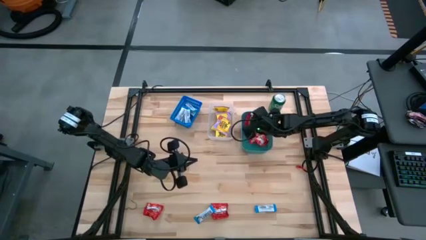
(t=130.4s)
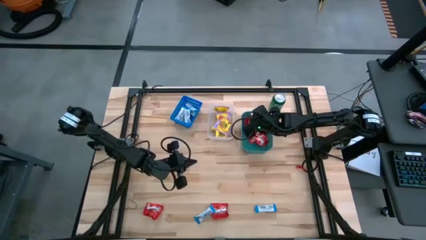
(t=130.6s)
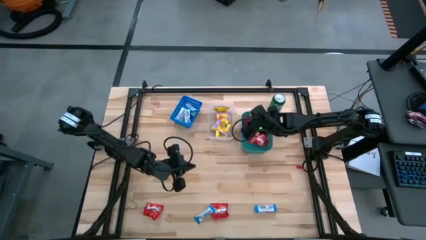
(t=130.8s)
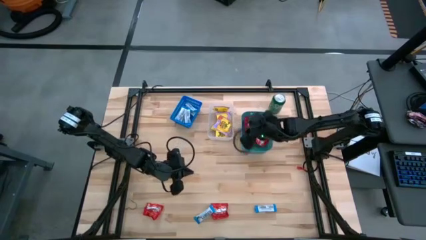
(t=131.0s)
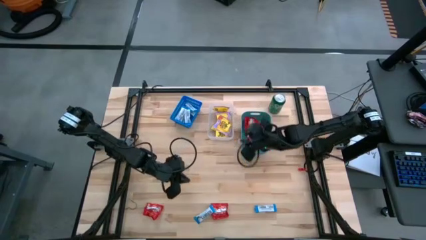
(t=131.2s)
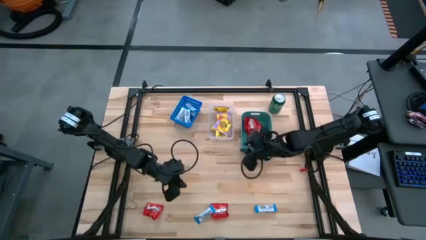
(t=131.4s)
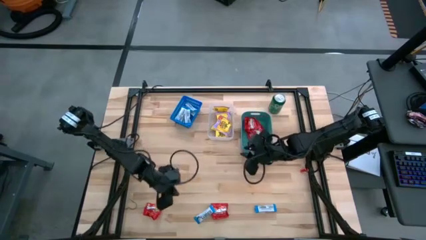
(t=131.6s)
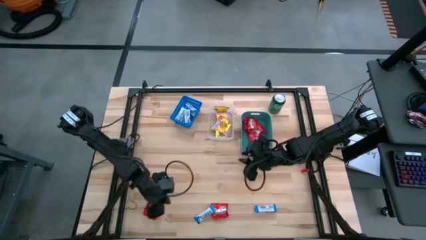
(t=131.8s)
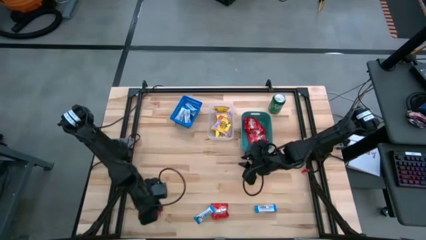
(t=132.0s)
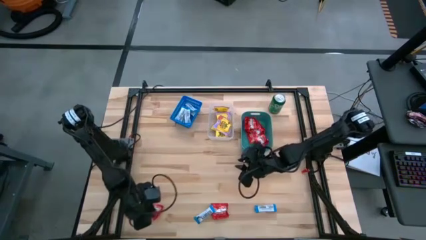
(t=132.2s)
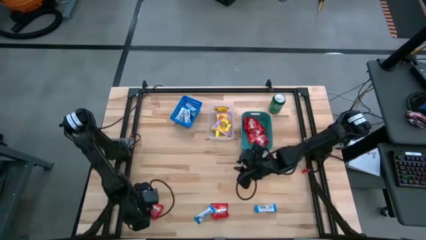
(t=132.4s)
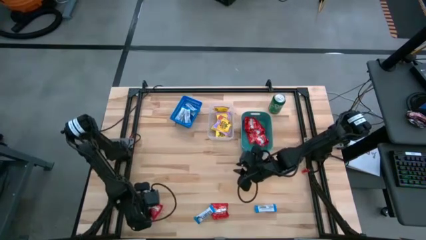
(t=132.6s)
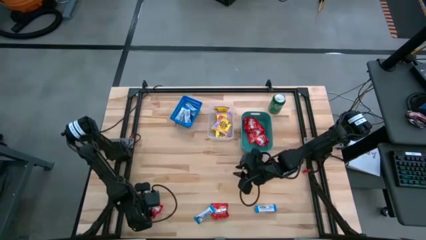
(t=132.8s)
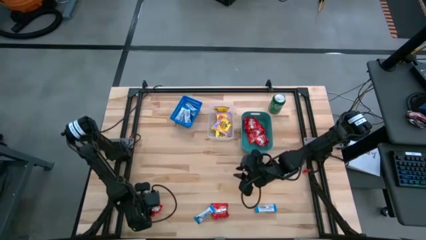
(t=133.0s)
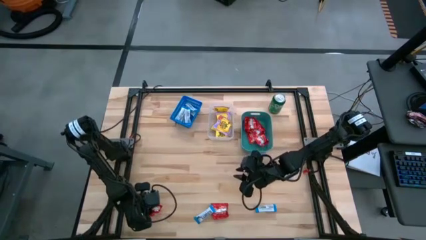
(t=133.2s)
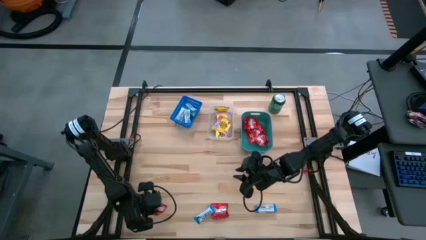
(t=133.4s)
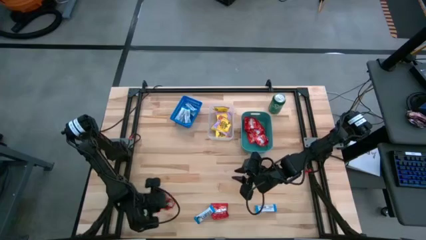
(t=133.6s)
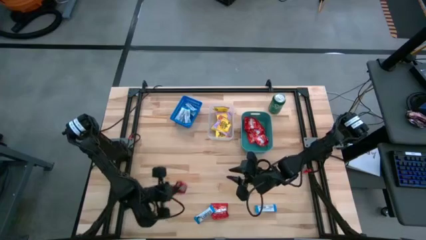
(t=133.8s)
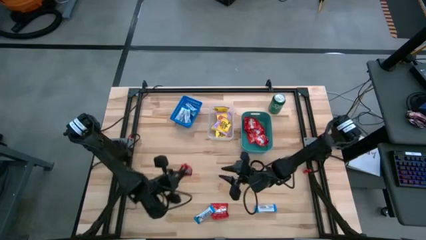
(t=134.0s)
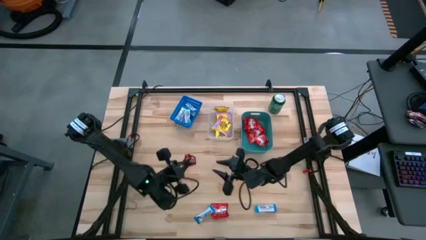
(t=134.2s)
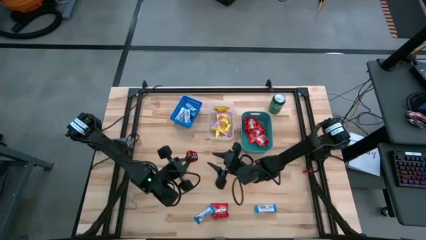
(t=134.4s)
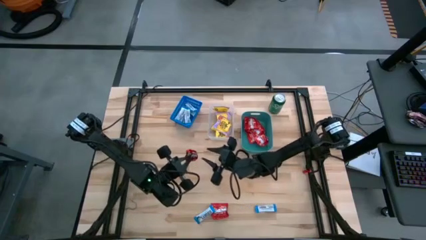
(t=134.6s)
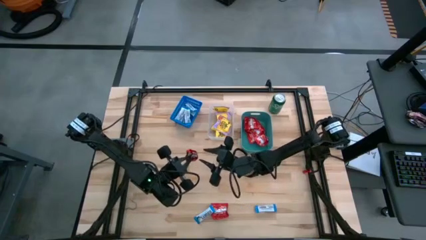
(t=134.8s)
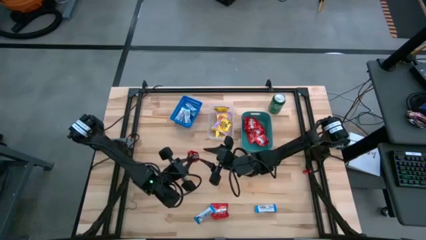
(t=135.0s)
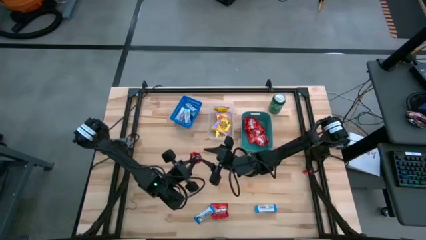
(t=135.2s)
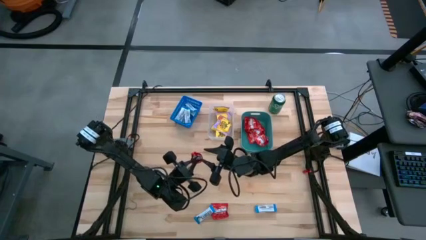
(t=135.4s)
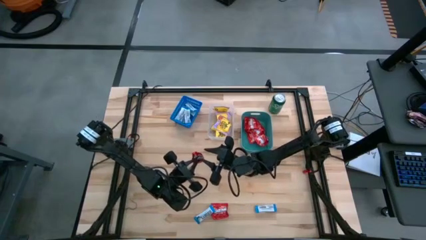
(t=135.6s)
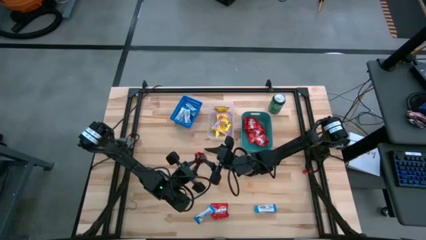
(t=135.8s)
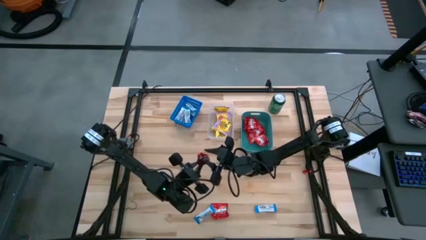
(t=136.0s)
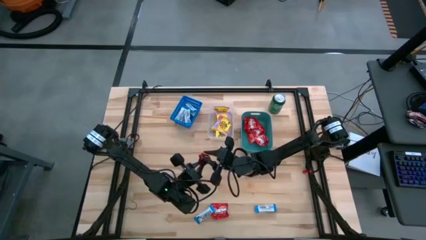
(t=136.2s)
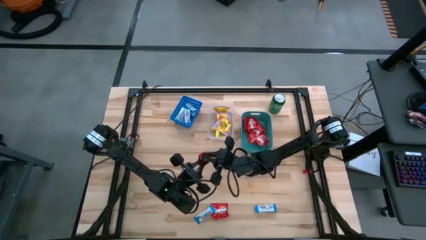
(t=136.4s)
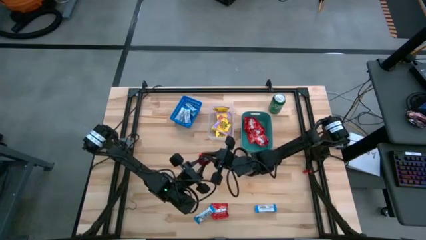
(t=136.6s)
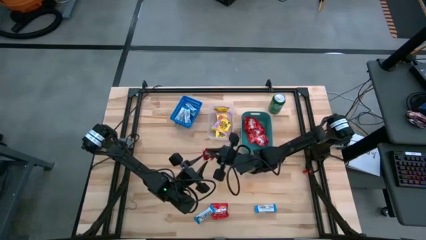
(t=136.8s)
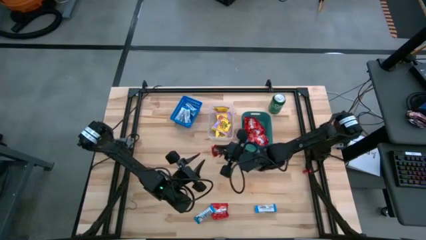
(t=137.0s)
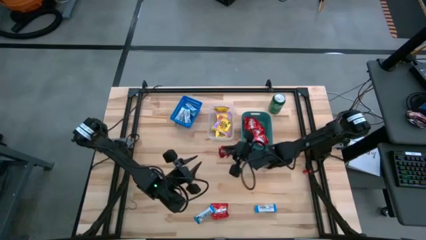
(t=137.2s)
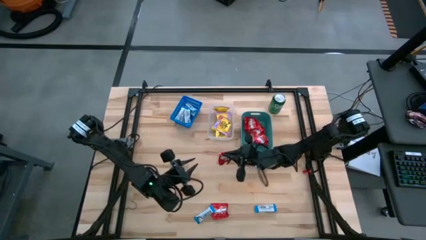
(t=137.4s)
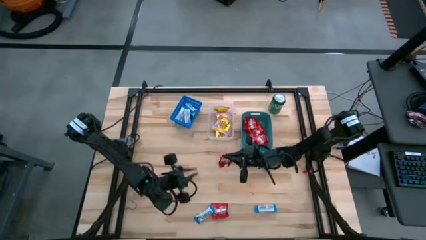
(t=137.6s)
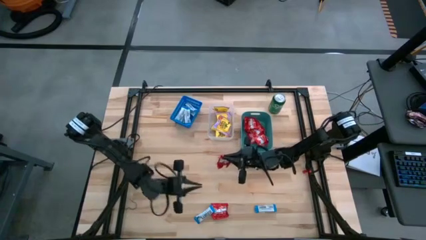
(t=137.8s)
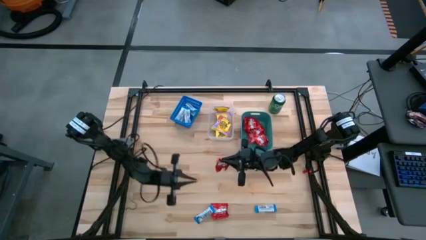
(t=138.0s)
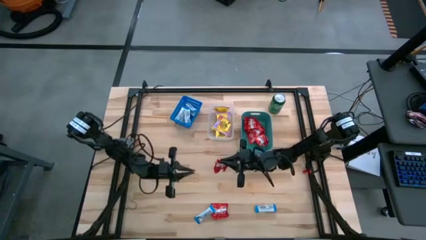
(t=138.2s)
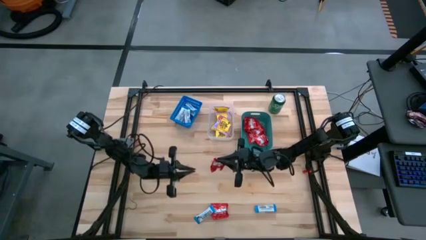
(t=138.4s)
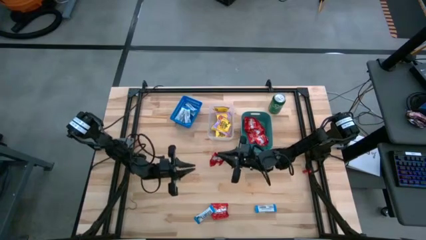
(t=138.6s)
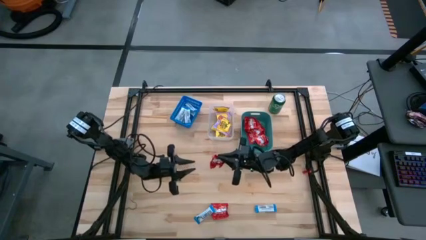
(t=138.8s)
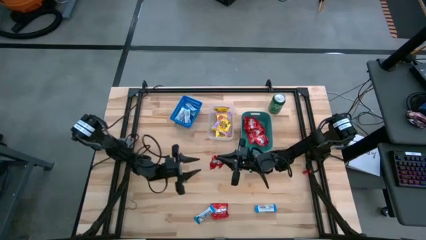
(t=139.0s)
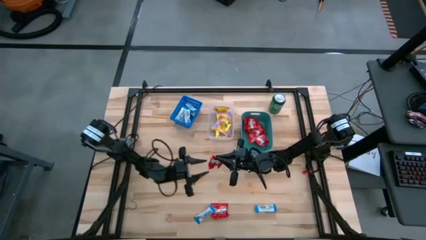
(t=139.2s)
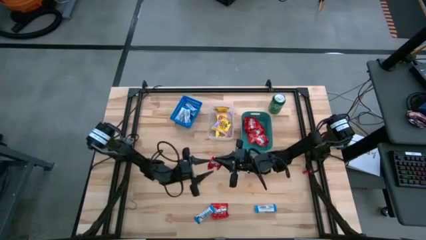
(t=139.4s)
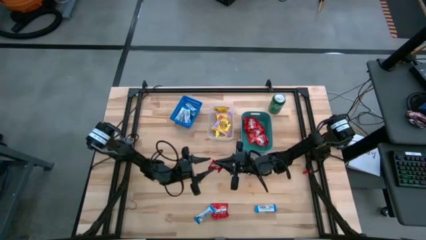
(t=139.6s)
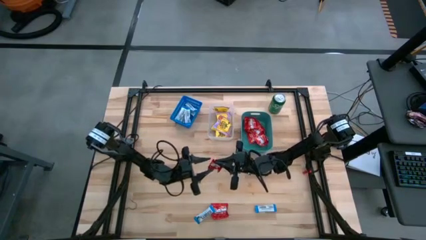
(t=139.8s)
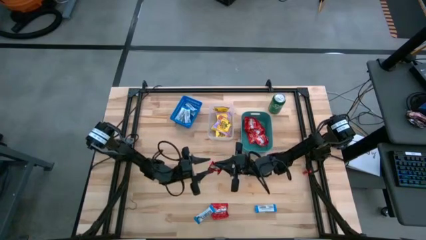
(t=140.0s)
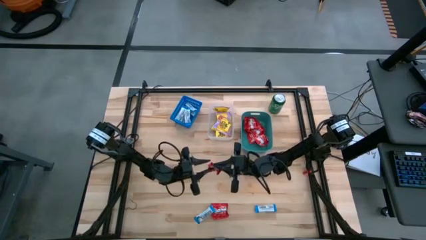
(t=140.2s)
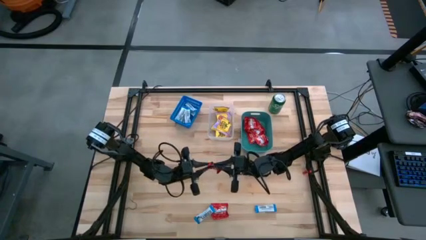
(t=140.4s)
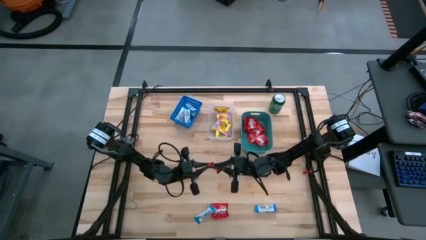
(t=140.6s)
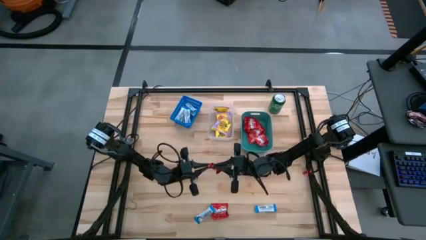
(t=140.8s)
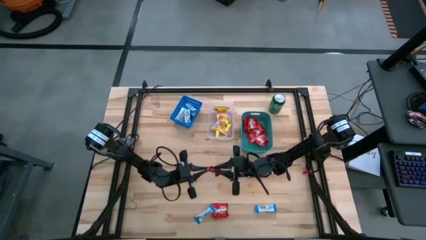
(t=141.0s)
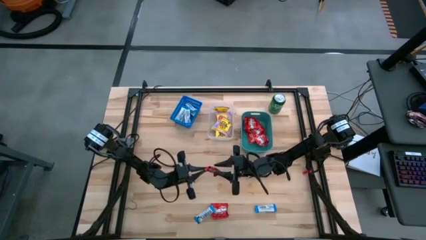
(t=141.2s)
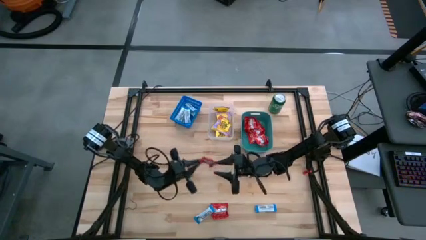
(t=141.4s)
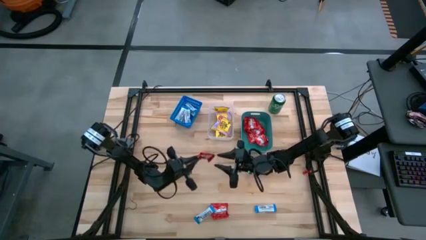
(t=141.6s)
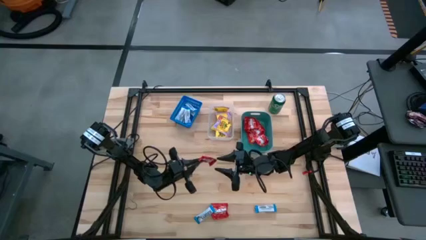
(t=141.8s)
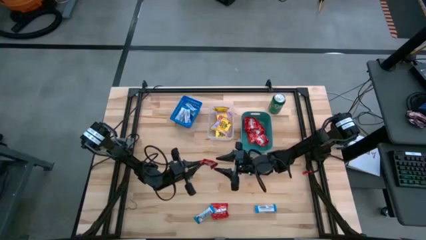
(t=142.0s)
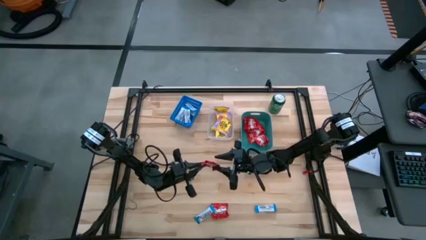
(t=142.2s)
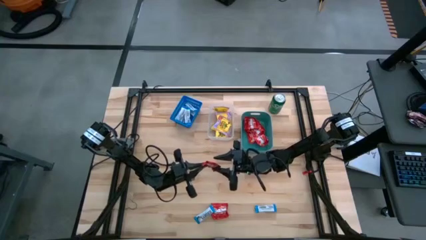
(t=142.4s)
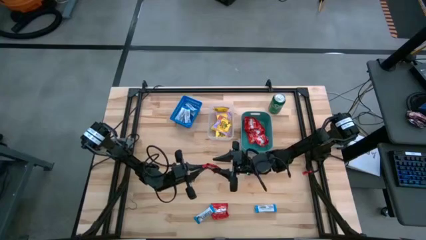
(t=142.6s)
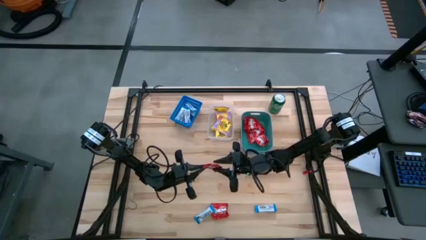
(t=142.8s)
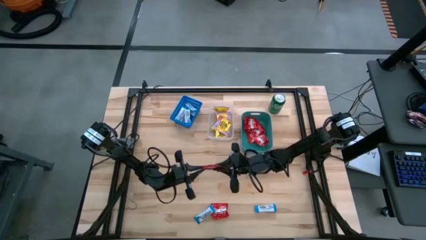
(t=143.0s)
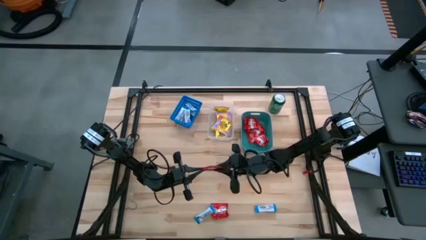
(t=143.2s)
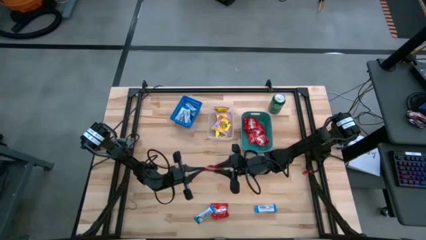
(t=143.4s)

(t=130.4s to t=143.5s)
Task: Sort candy
Put the red candy into the green bin
